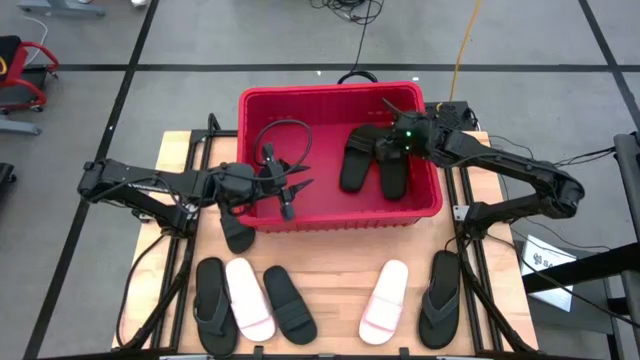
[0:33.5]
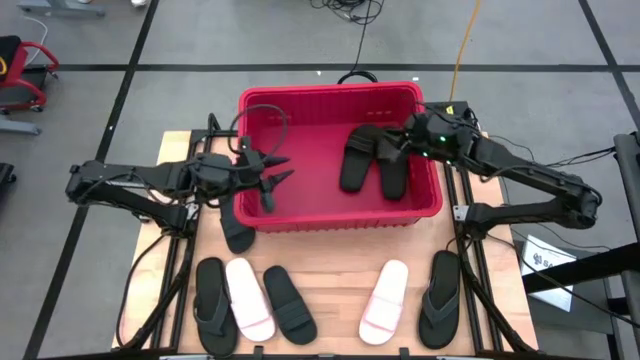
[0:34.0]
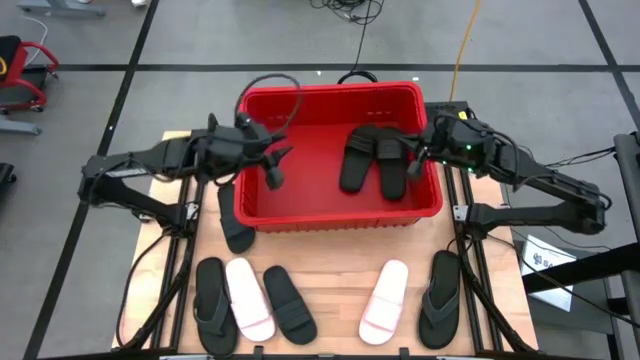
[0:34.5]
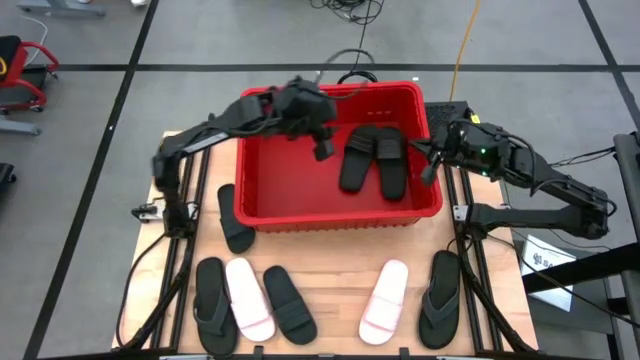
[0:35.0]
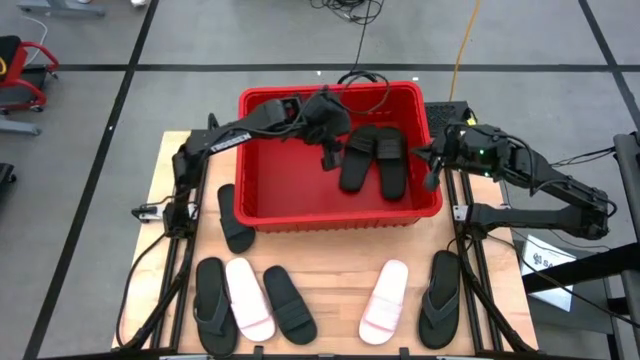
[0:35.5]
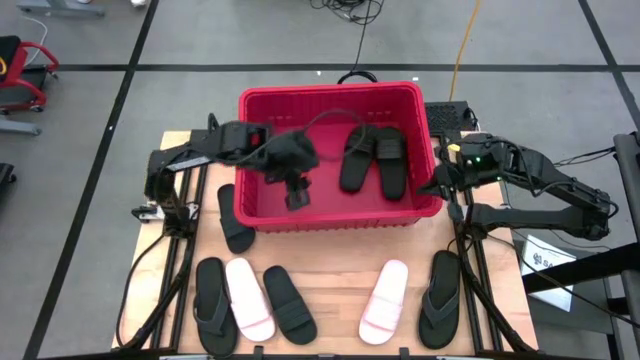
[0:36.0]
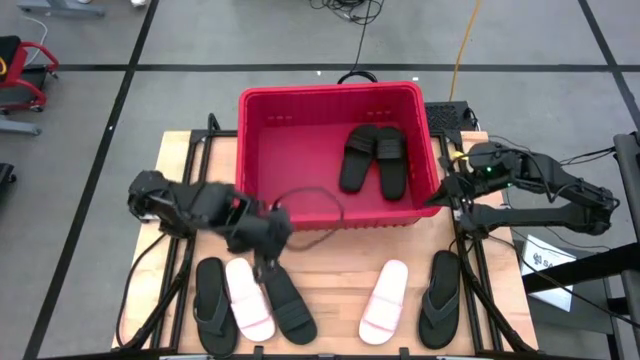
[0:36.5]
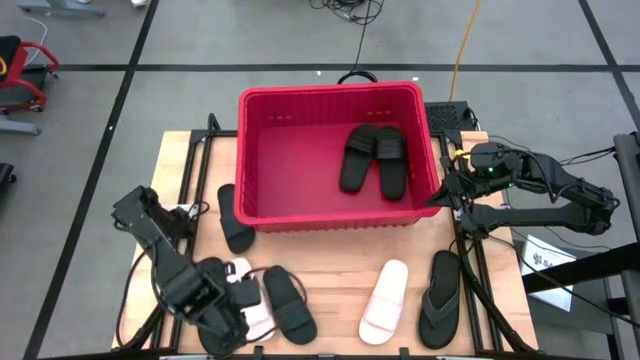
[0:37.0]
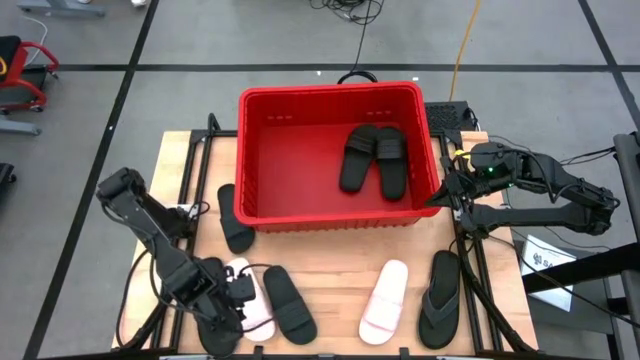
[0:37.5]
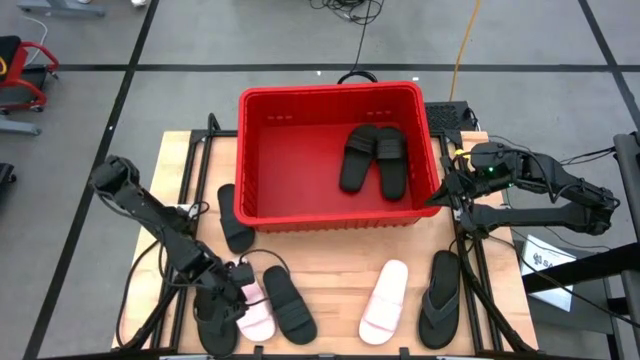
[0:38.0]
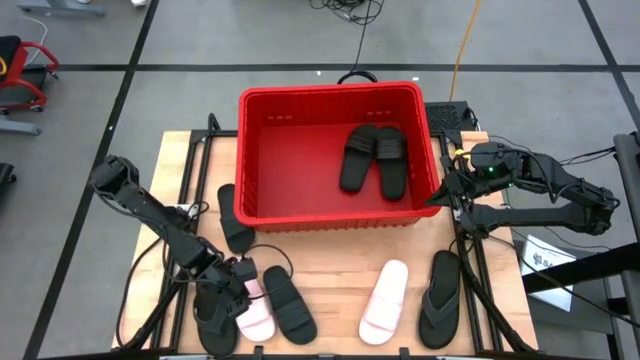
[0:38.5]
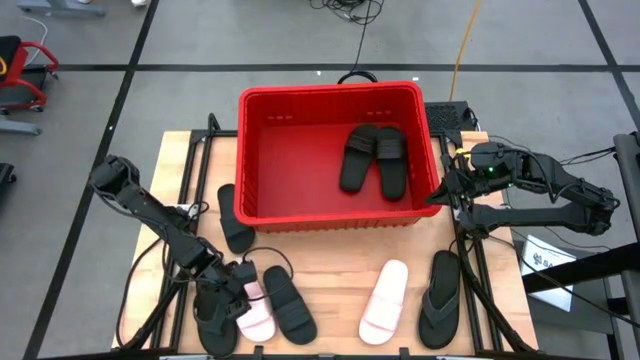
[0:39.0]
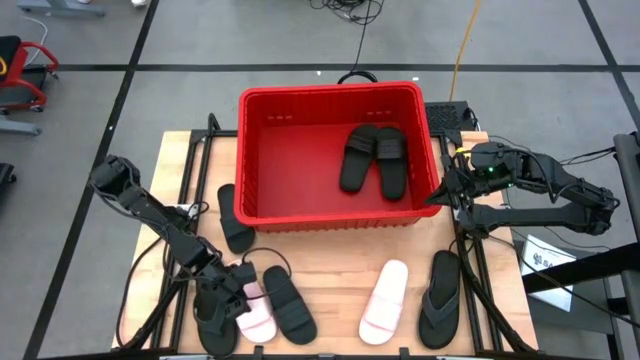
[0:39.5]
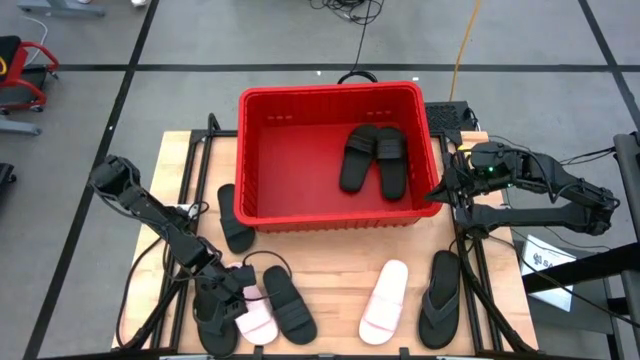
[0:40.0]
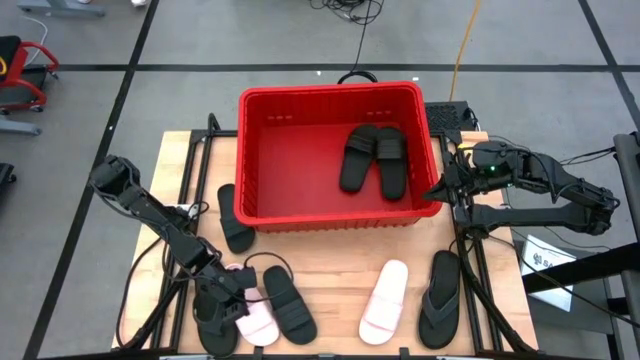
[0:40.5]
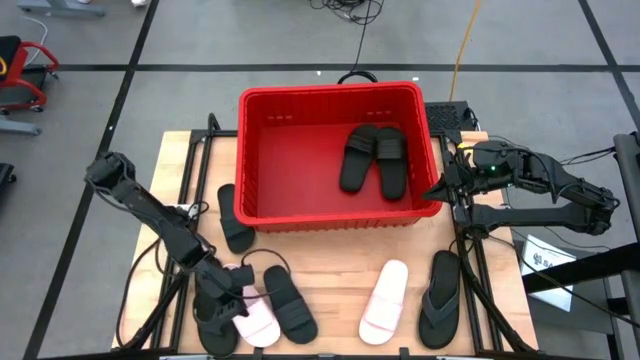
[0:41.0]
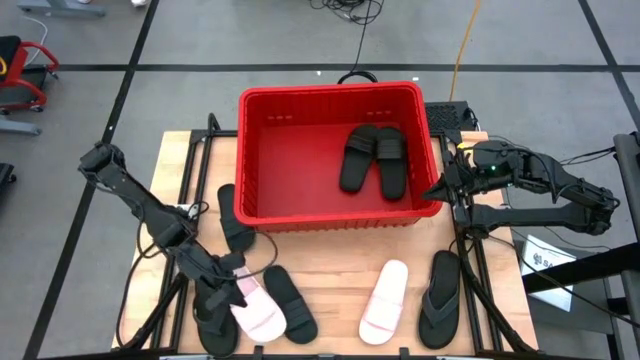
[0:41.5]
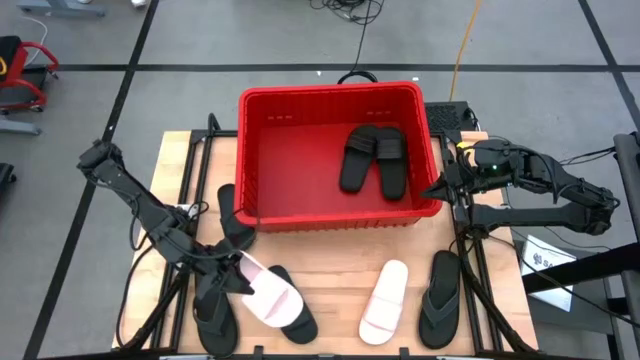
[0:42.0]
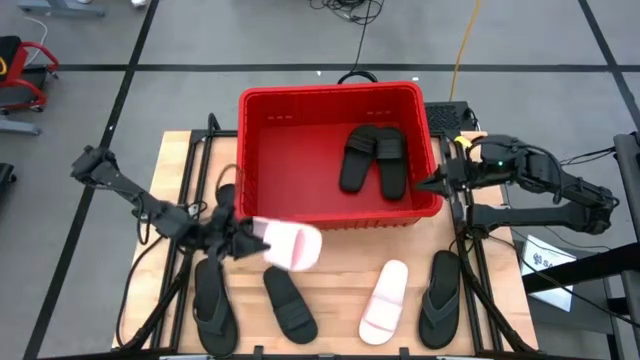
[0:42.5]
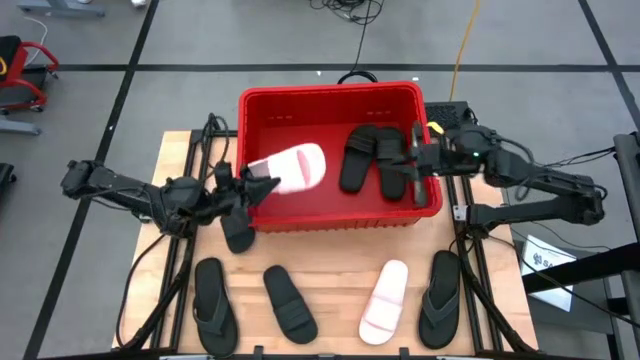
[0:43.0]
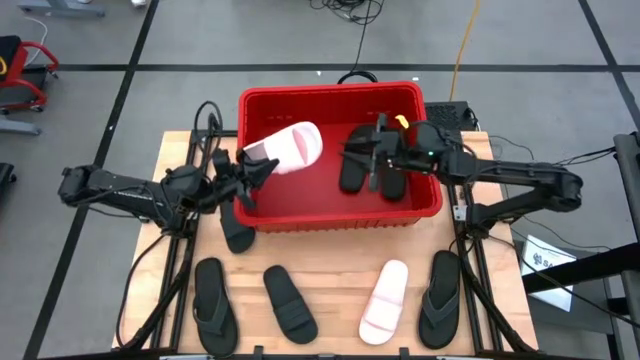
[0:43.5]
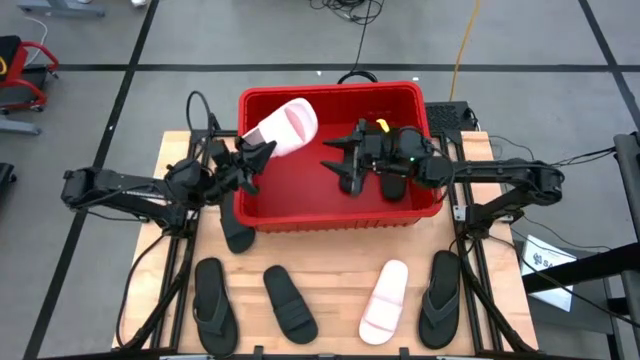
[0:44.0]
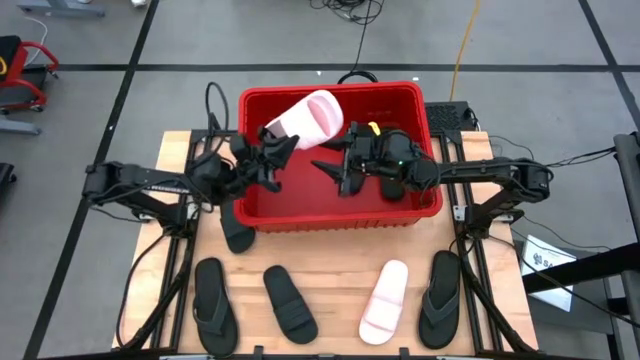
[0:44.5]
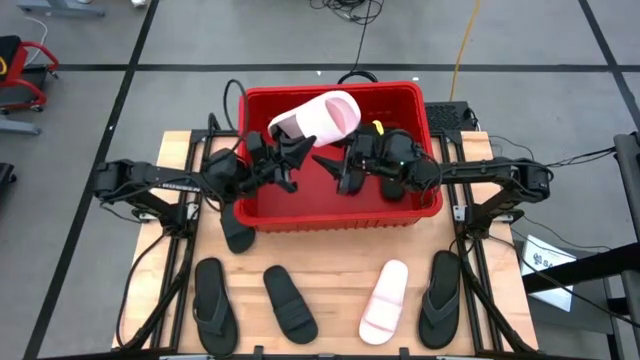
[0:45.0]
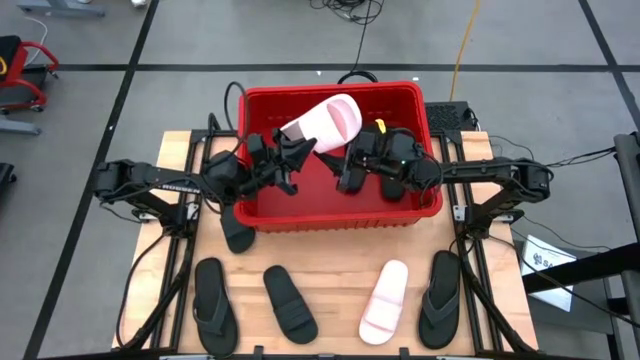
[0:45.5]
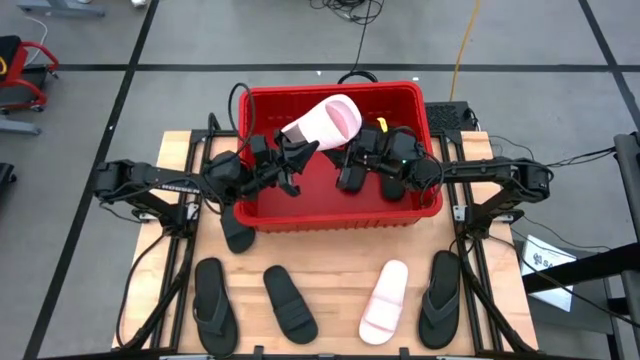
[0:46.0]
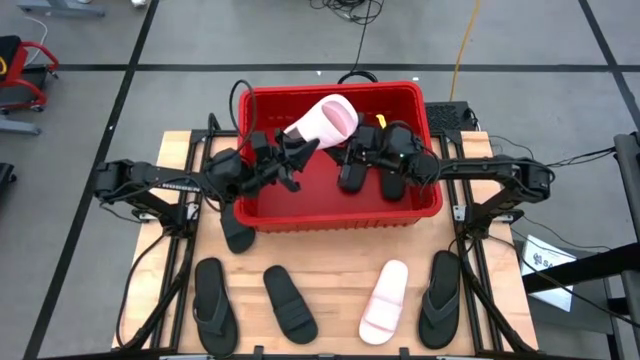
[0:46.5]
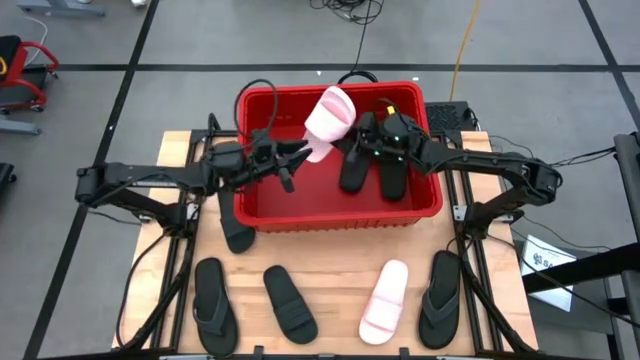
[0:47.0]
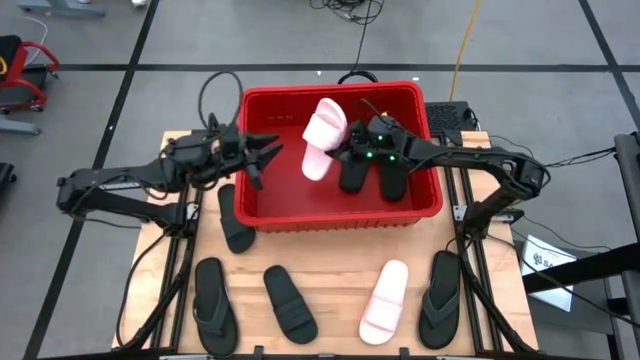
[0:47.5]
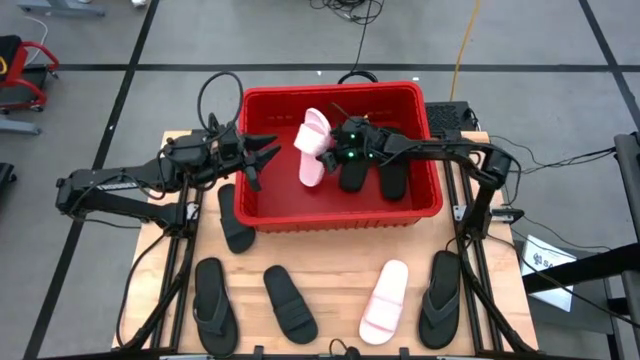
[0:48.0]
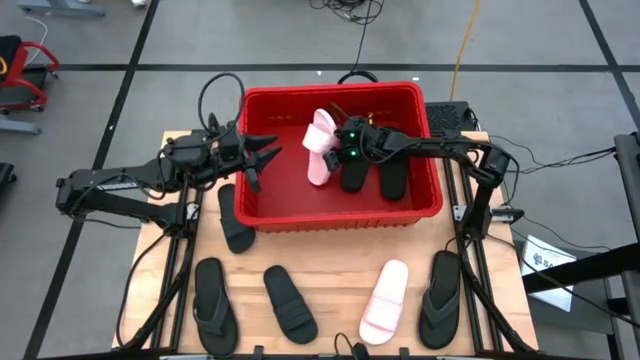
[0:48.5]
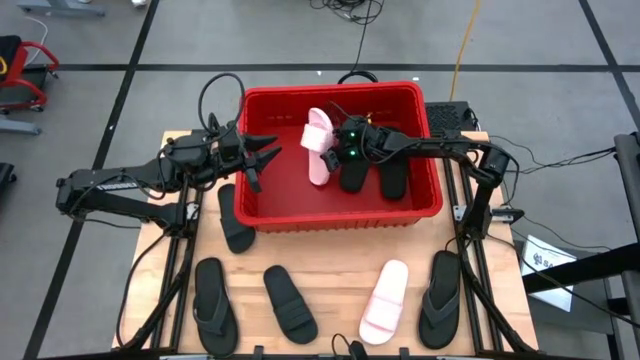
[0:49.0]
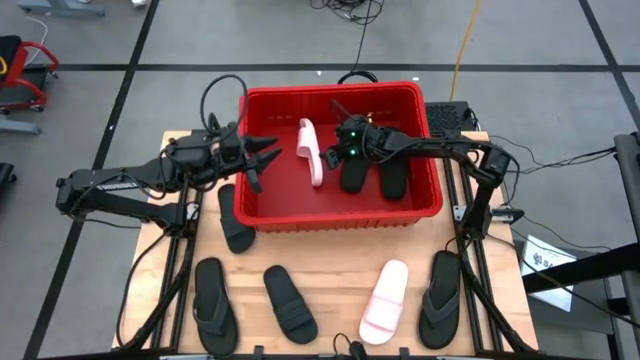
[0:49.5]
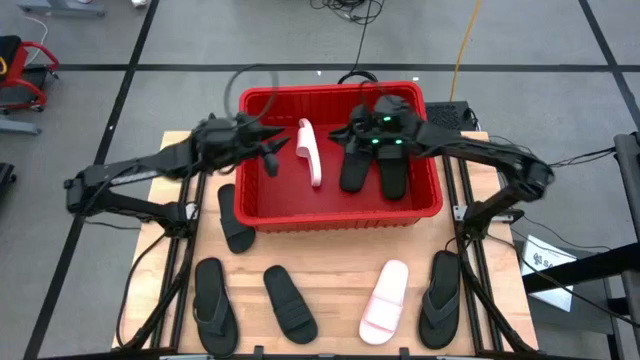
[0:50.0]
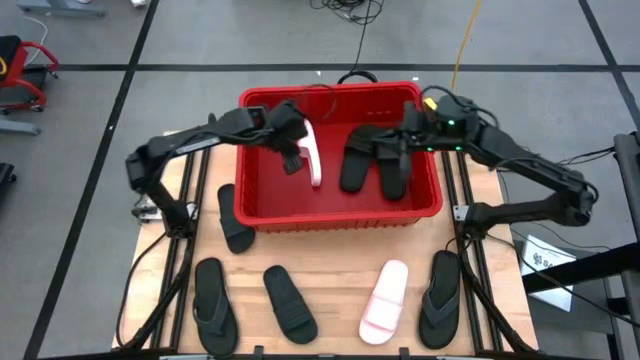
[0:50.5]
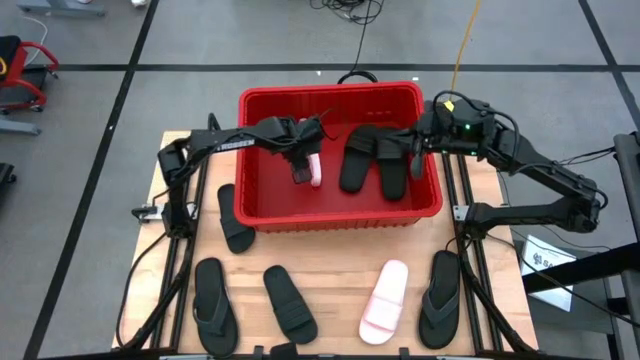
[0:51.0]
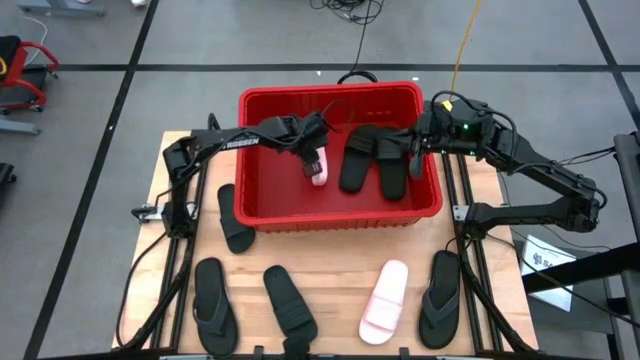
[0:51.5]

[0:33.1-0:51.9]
Task: Pick and place slides into bin
Put the pink slide into the red bin

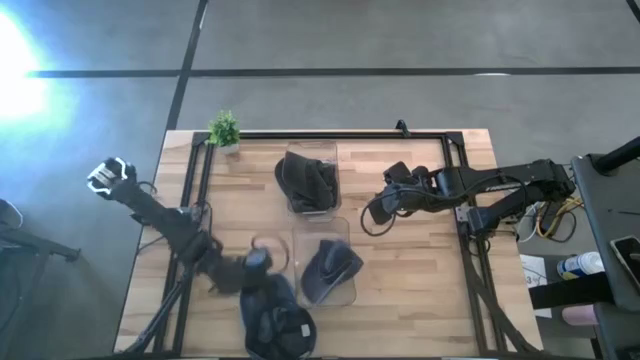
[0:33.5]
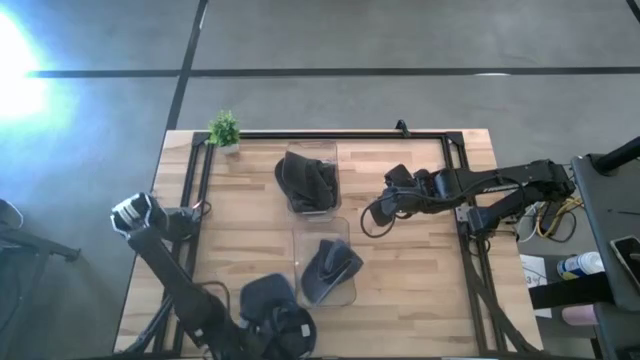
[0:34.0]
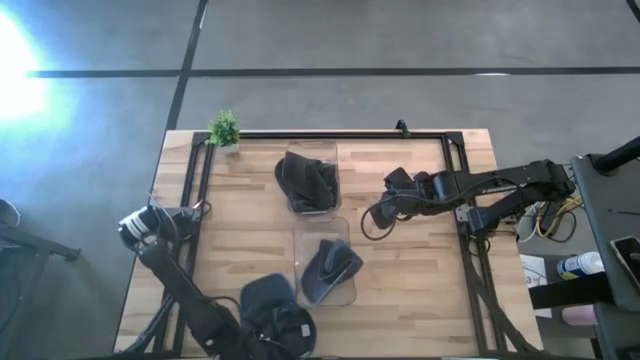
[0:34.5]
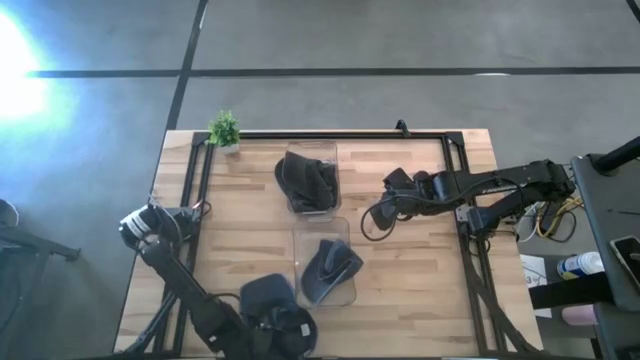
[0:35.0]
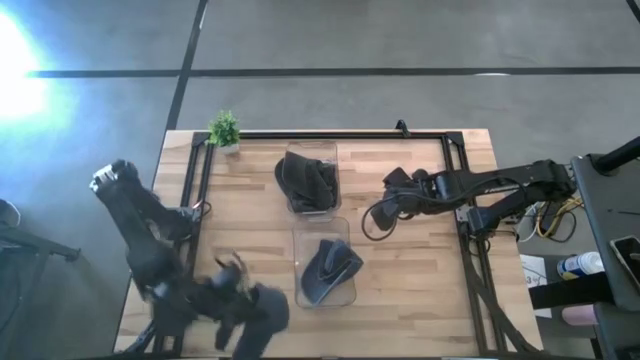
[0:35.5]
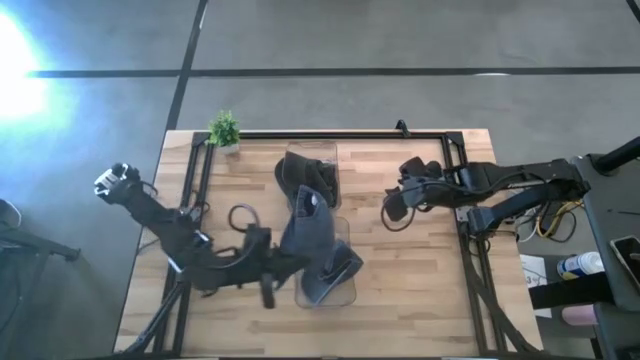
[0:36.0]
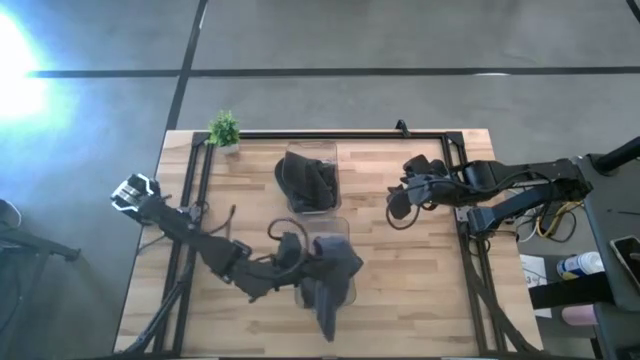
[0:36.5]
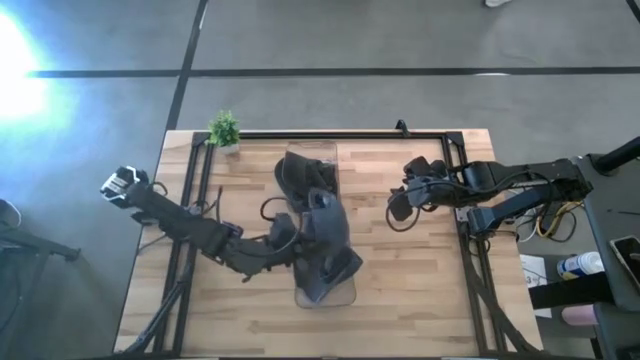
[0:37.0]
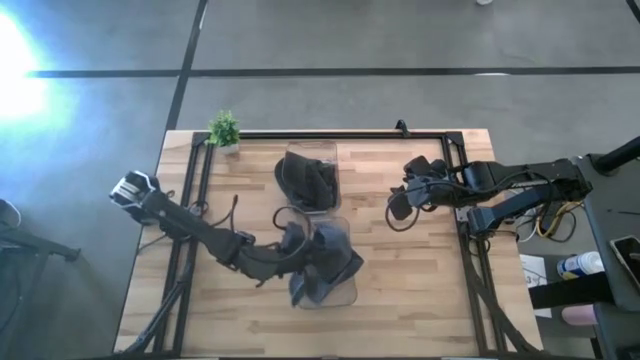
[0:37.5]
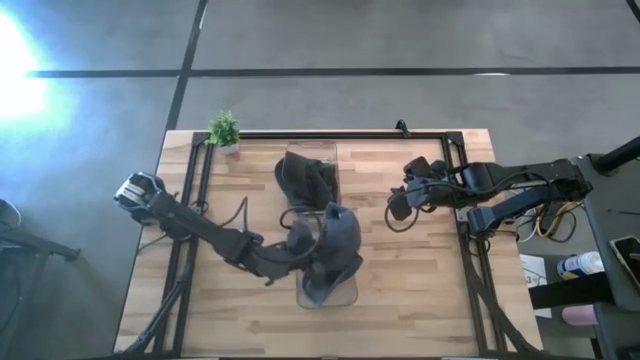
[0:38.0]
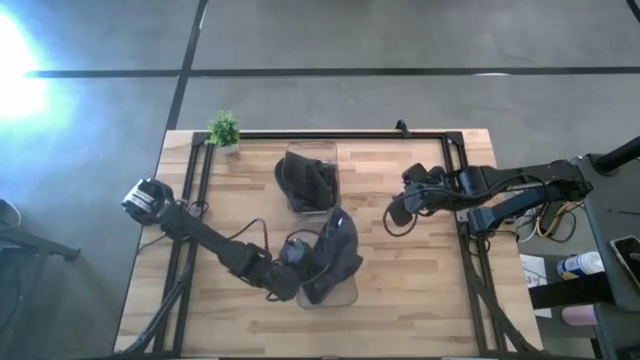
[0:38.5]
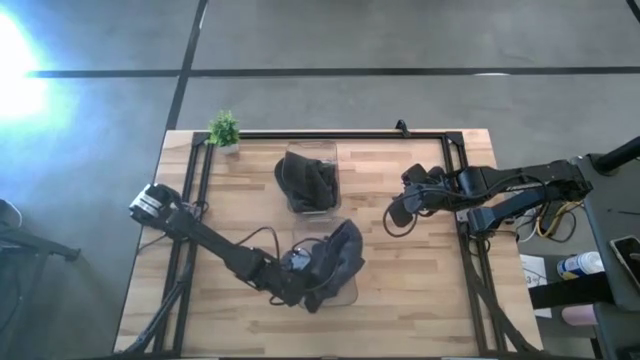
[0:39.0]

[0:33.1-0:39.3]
Task: Pick & Place hat
Put the blue cap into the bottom transparent bin
